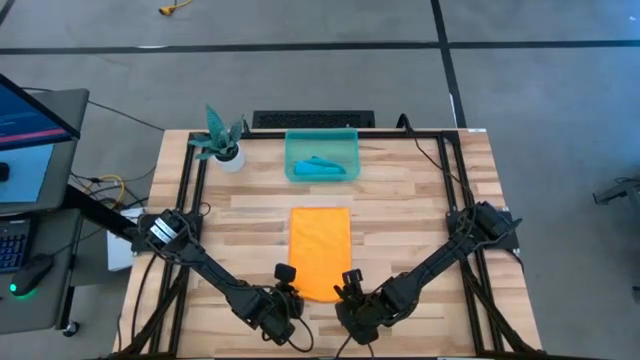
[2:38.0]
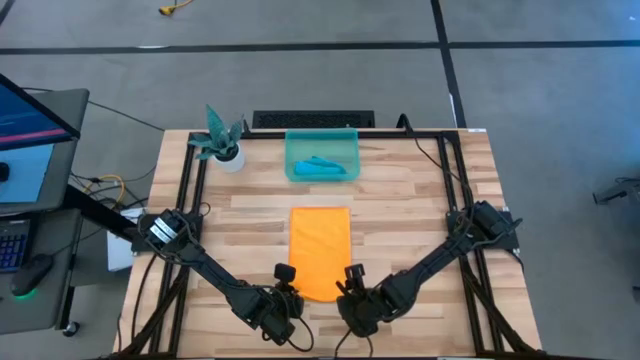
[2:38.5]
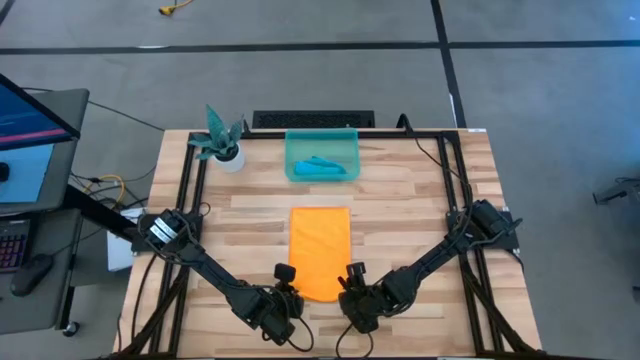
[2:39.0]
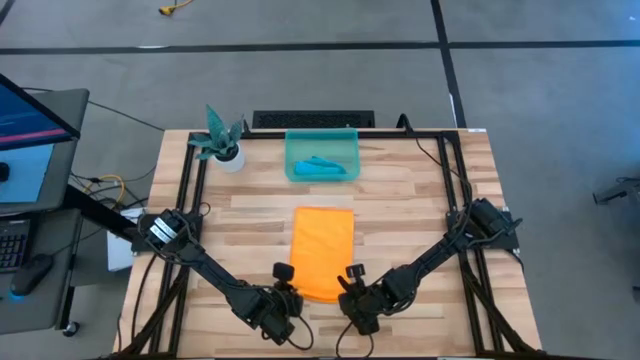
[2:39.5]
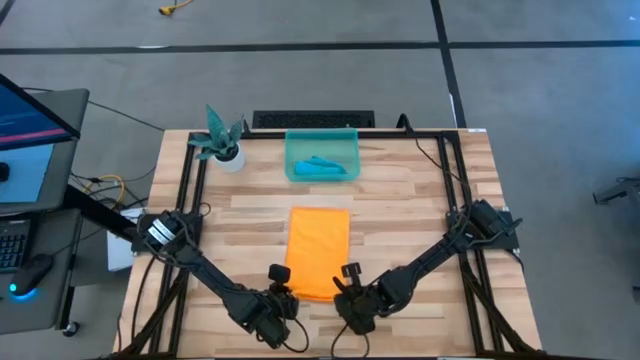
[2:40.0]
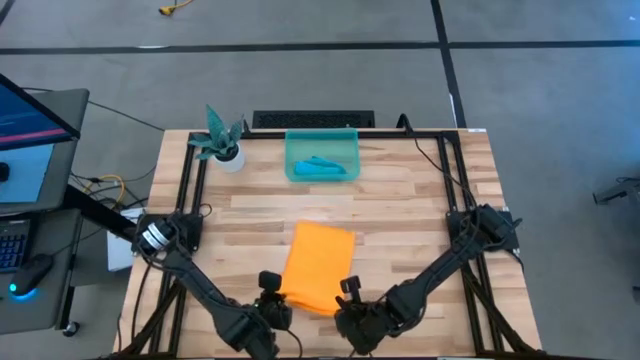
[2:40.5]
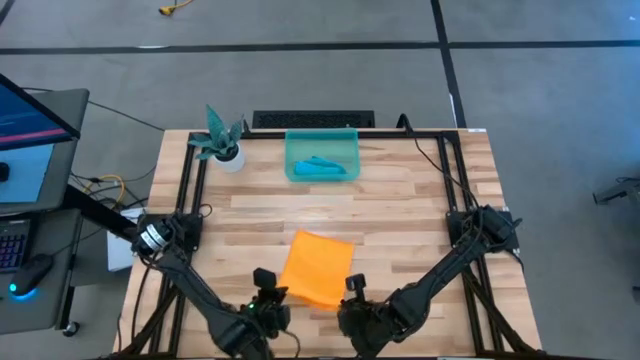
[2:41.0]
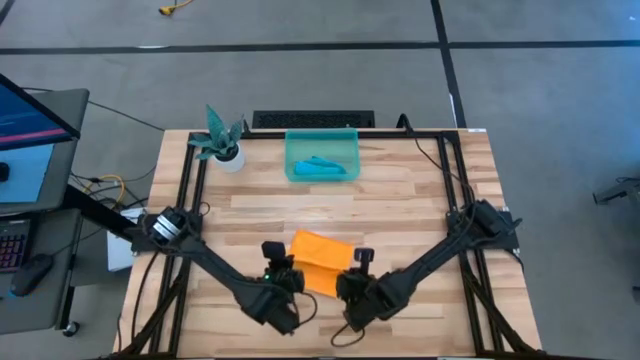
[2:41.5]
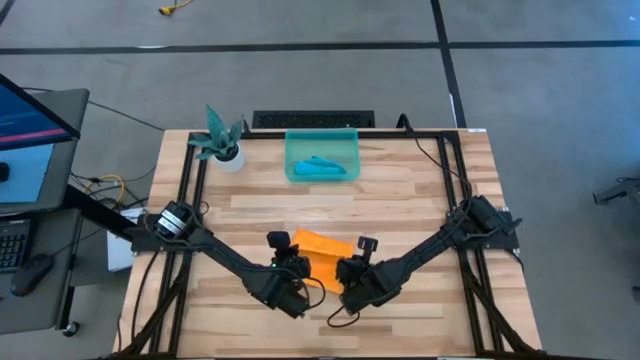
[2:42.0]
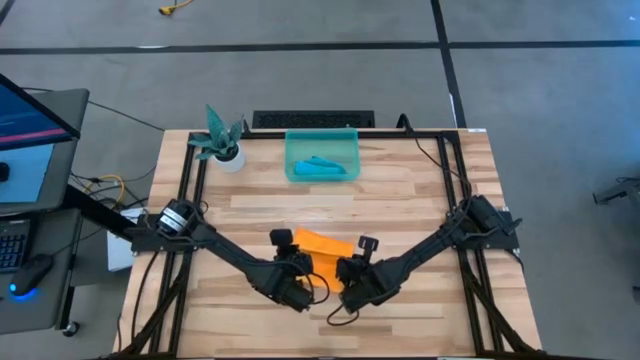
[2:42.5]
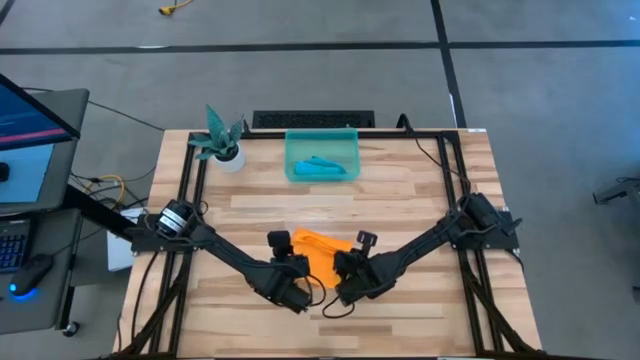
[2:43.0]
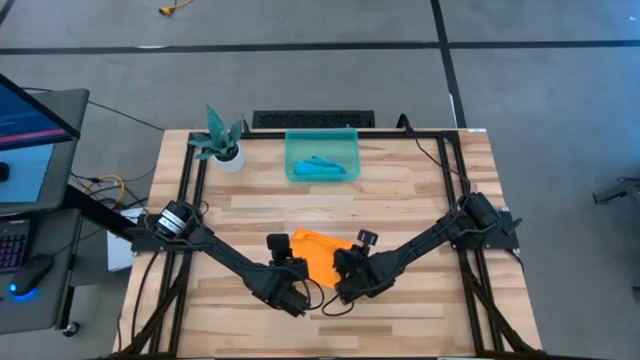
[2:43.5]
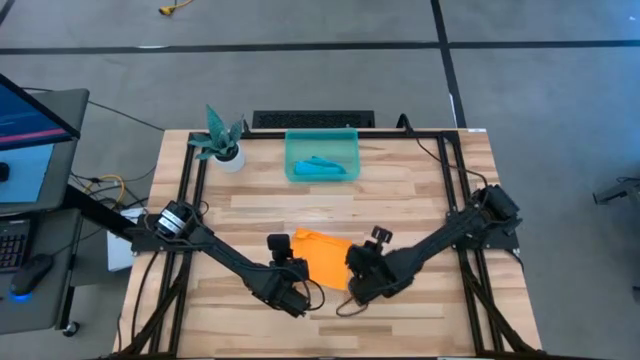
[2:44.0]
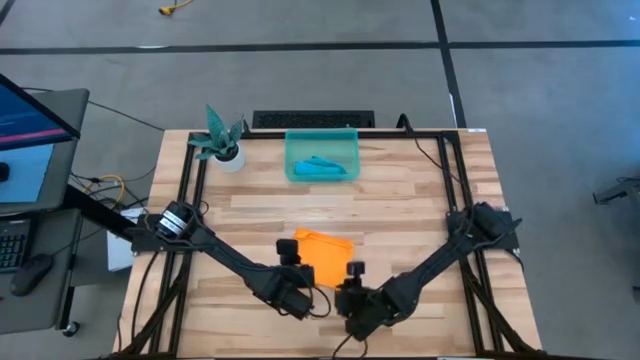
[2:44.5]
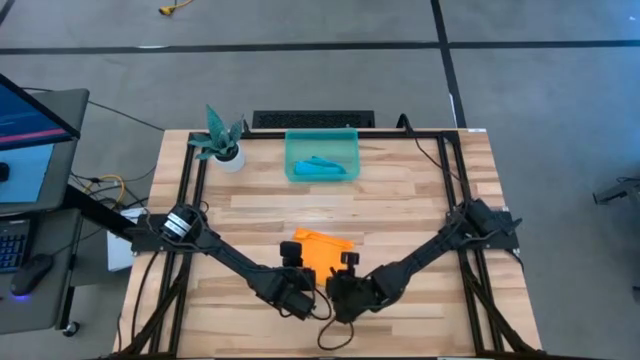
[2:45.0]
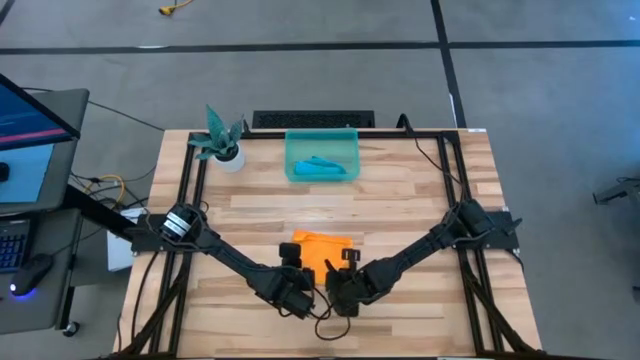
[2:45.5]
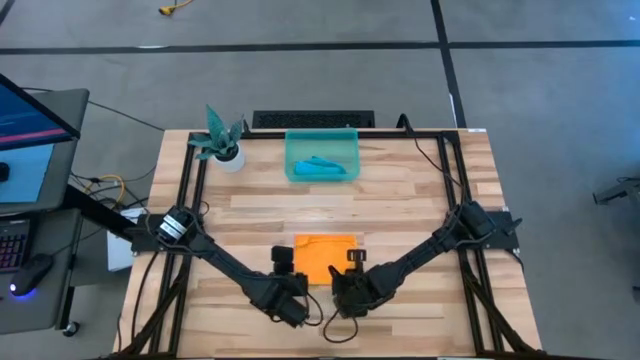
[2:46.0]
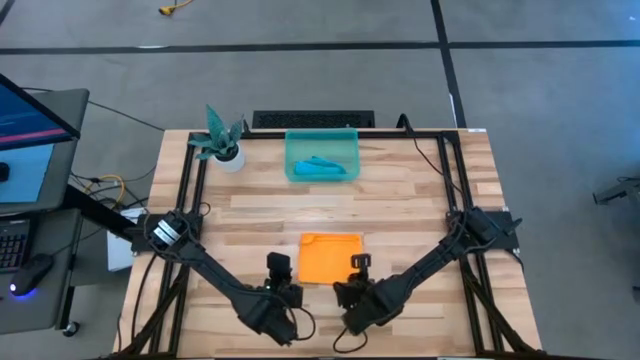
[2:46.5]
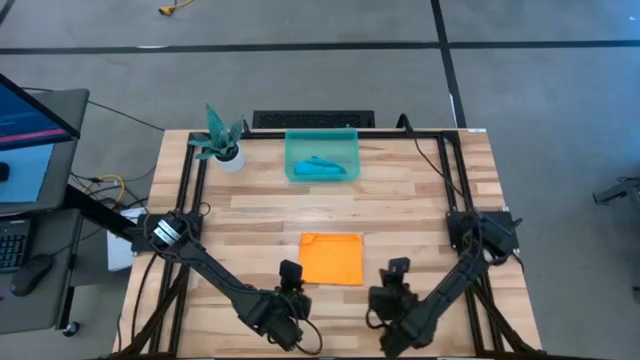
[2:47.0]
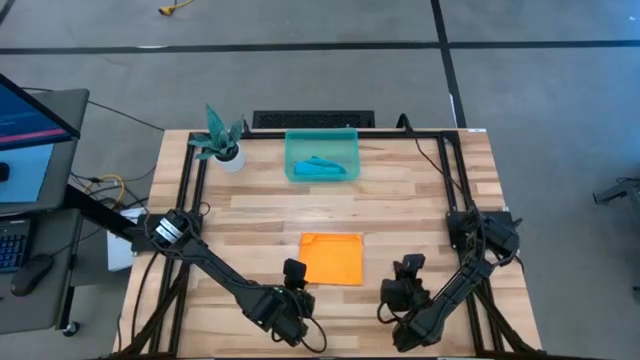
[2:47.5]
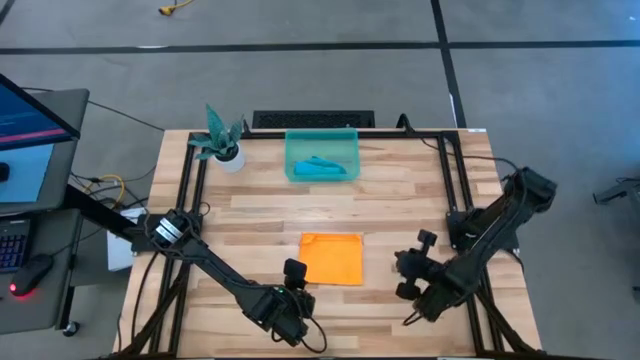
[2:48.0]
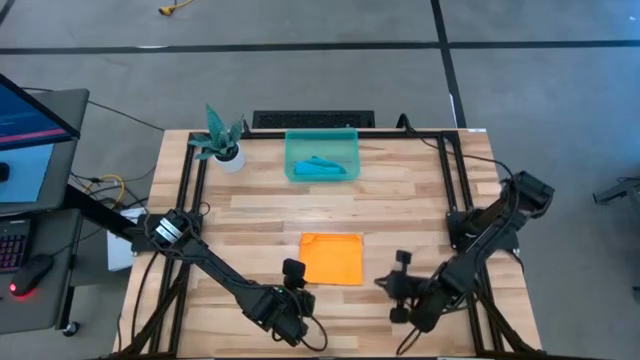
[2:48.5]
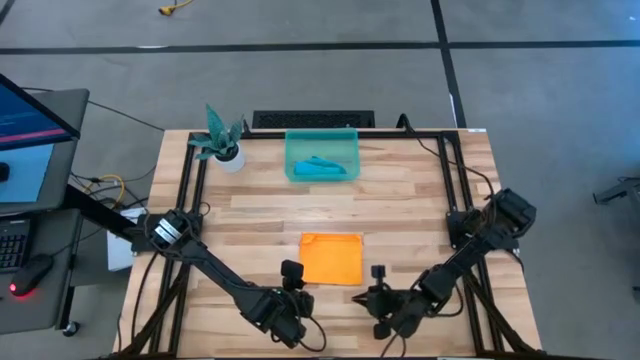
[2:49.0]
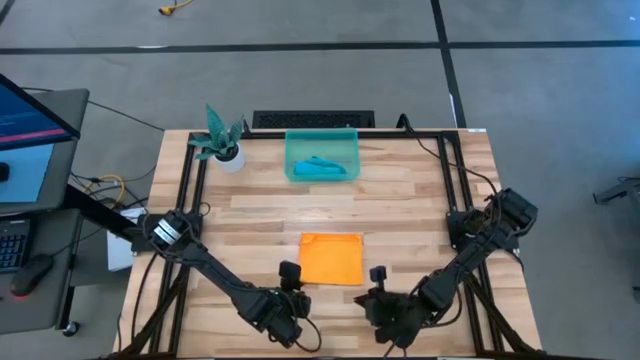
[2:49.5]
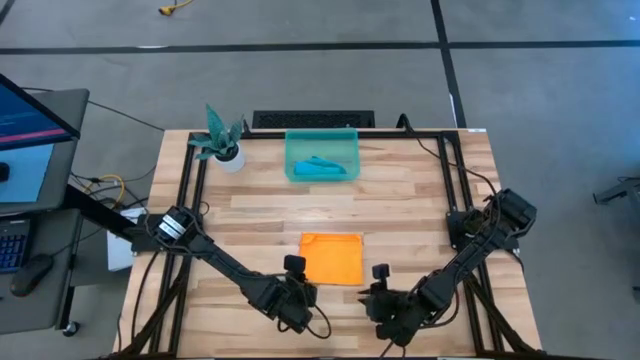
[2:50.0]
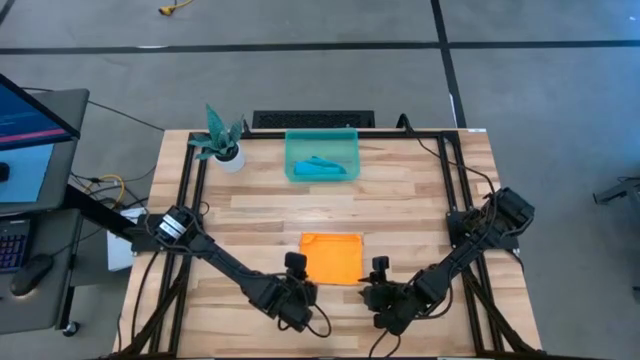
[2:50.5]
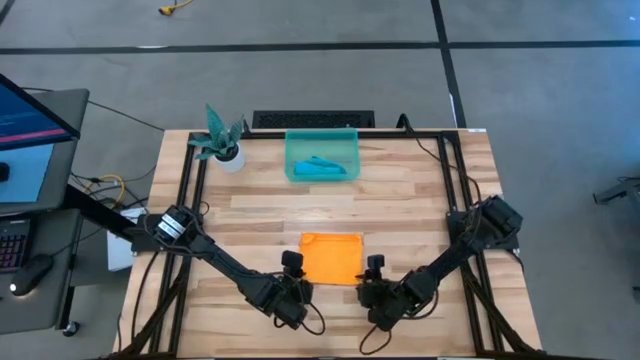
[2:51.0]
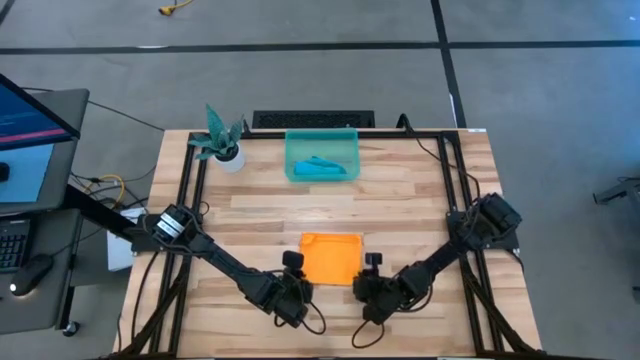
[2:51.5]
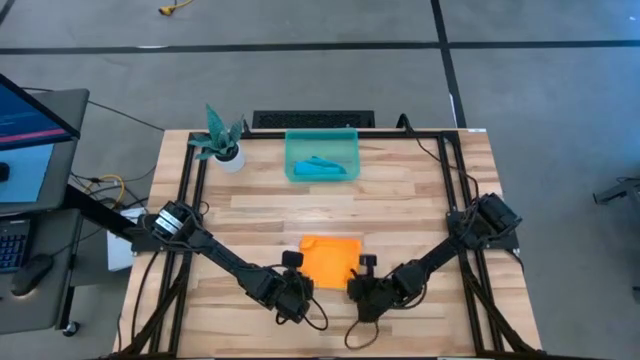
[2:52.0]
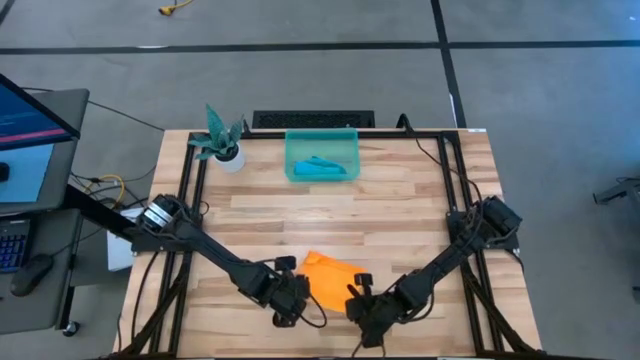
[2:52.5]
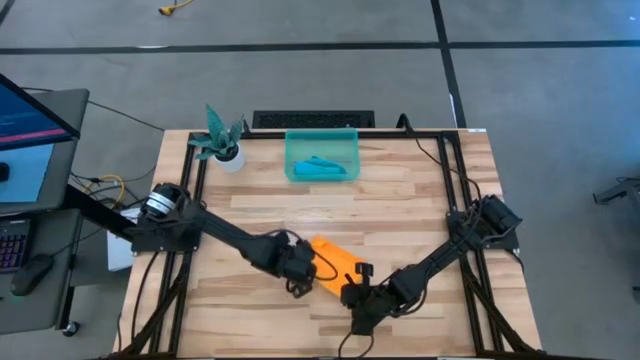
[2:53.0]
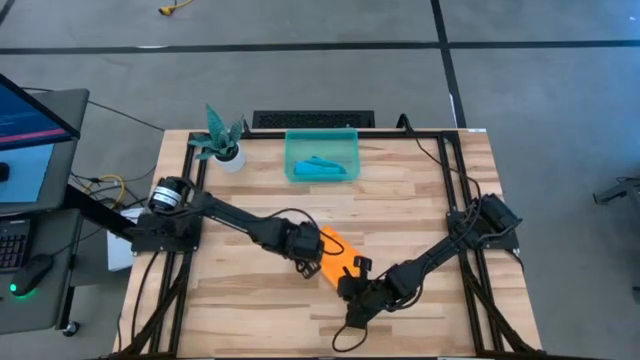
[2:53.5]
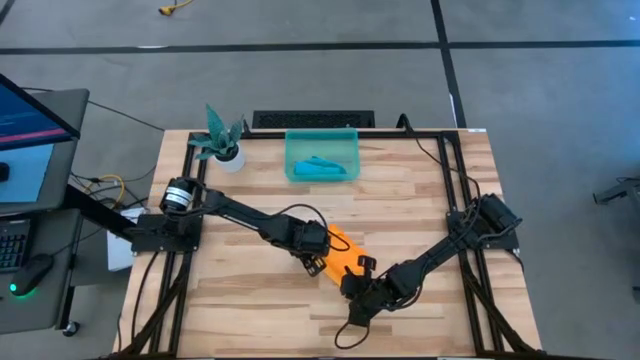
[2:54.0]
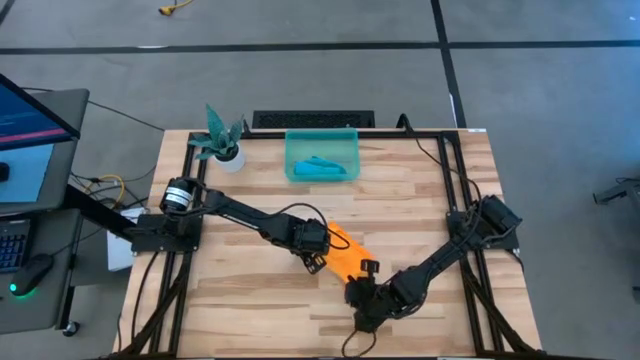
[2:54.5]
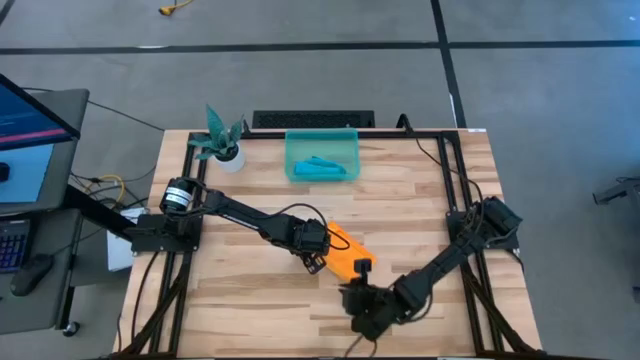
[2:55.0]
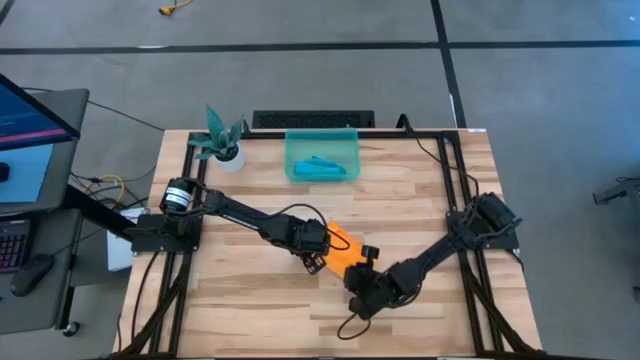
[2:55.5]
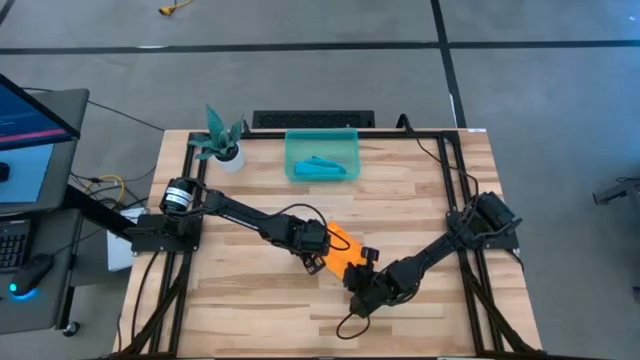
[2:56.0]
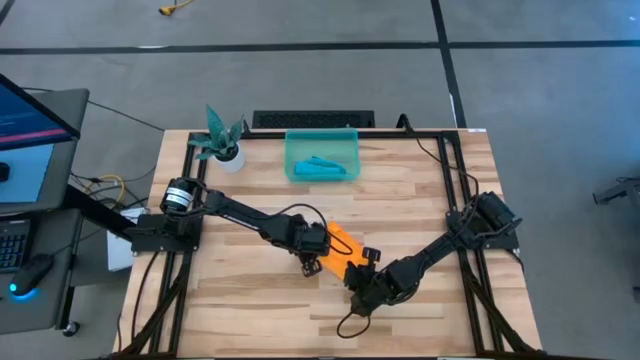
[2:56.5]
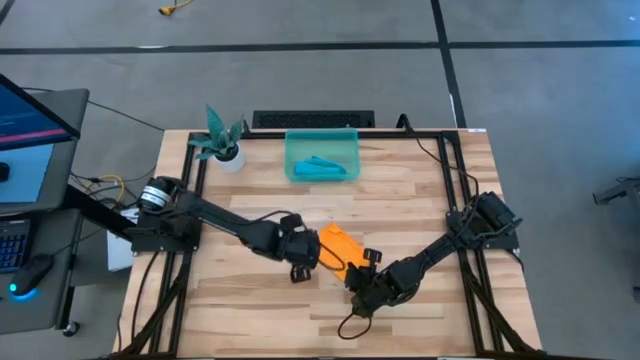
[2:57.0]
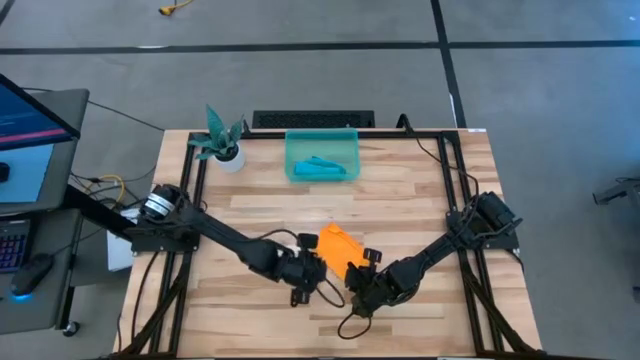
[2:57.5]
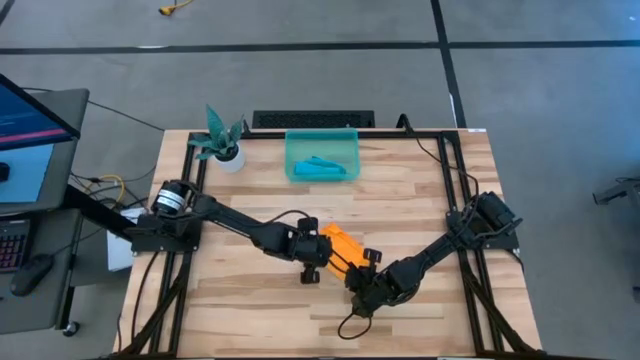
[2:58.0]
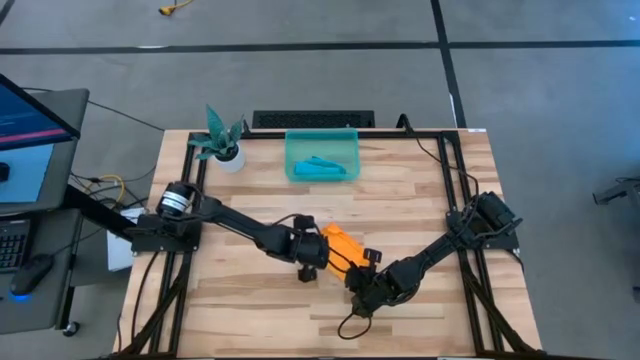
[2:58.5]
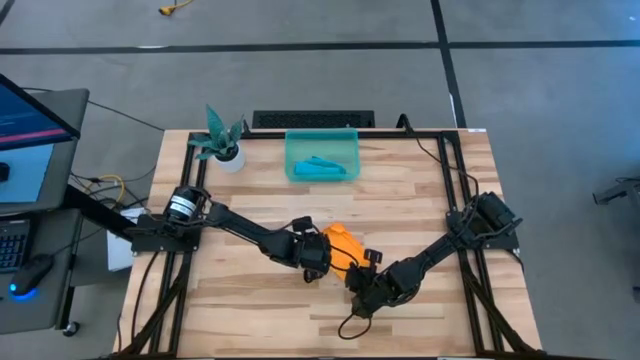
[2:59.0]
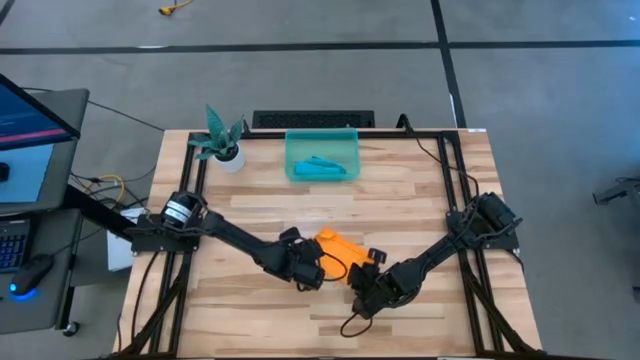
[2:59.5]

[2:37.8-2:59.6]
Task: Roll microfiber towels into tight, uniform cylinder then place into a basket
Roll the orange microfiber cloth
